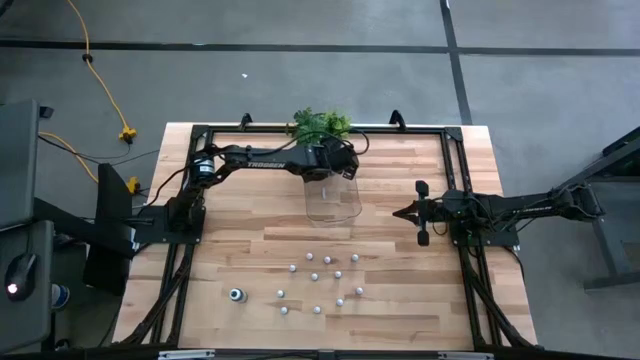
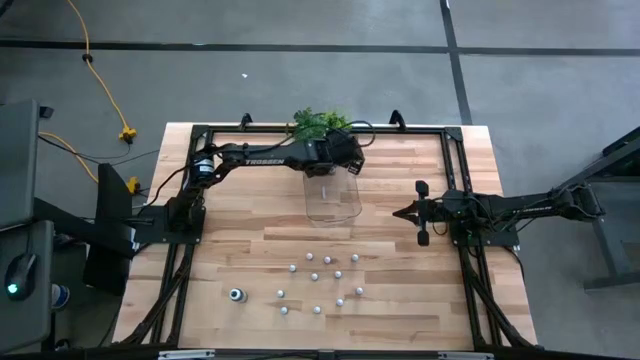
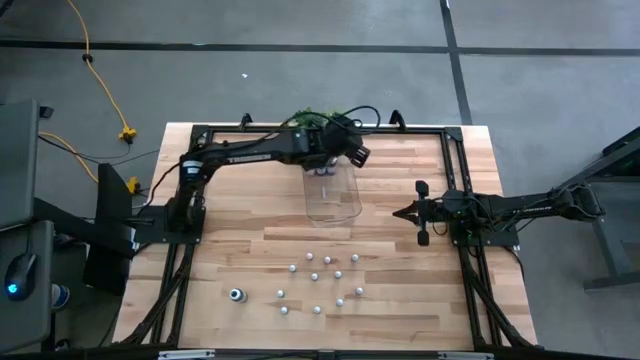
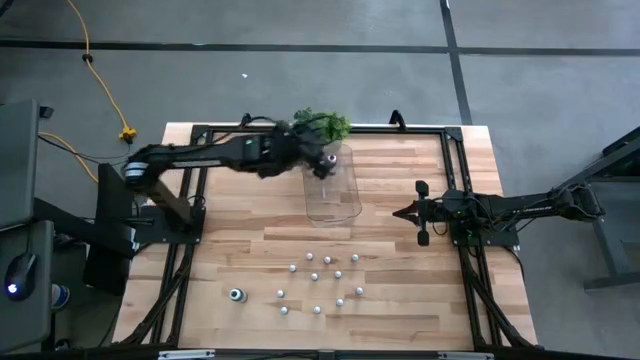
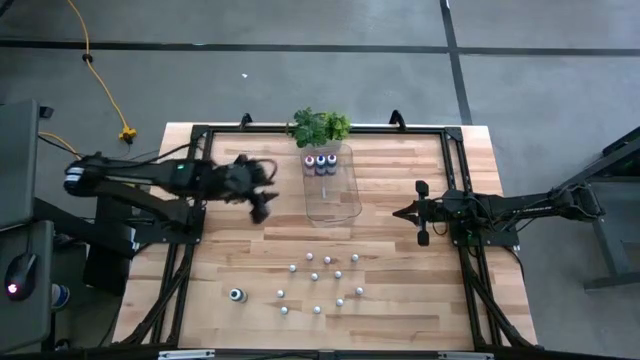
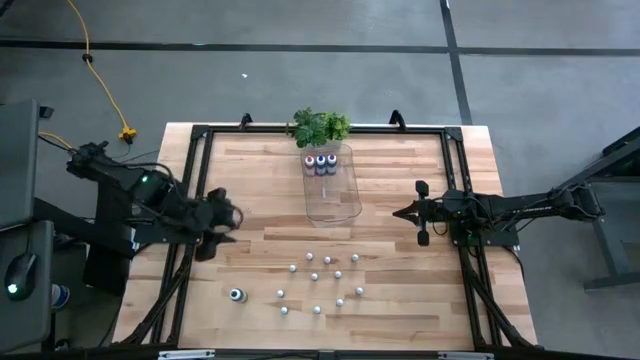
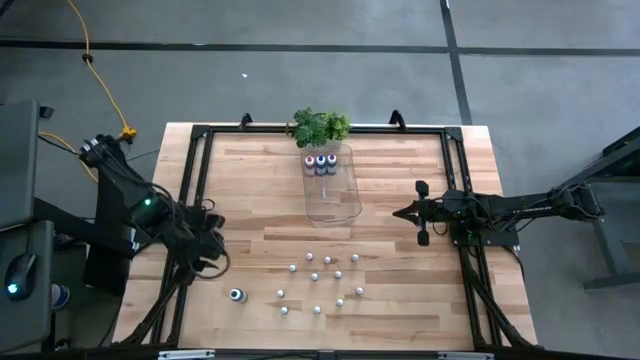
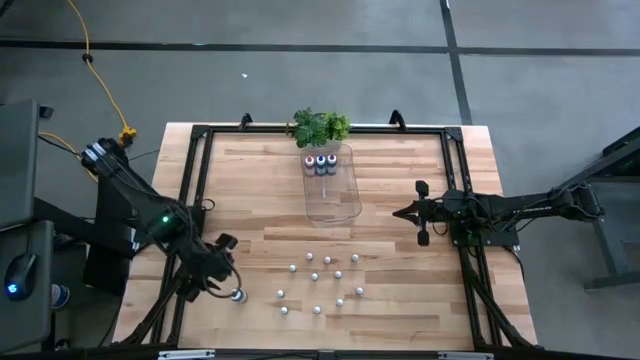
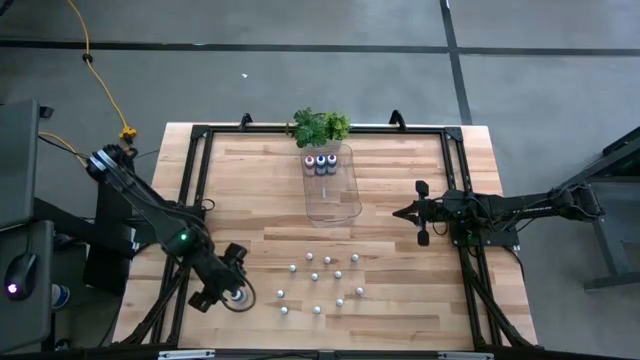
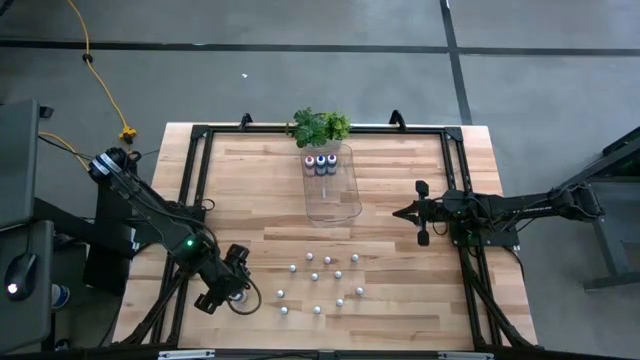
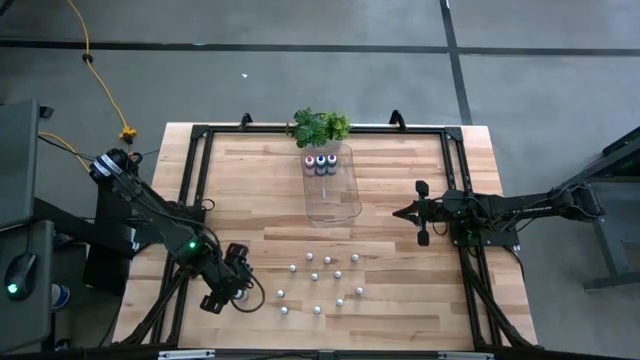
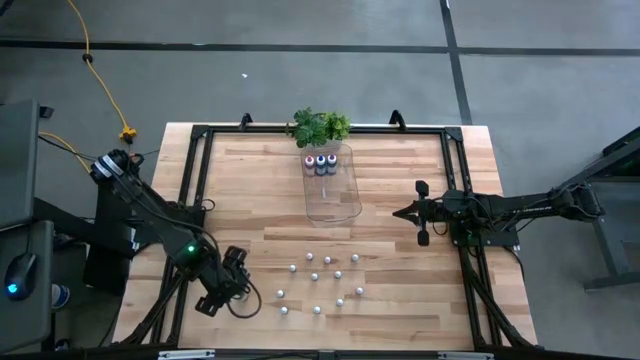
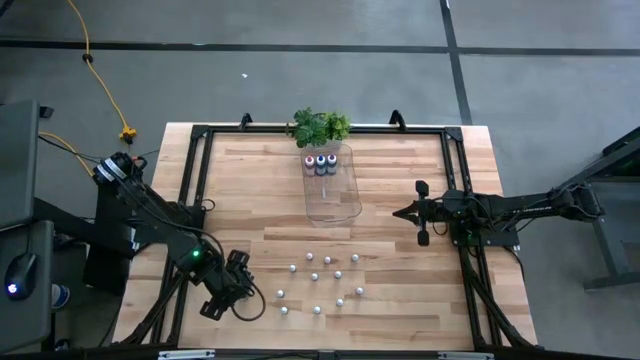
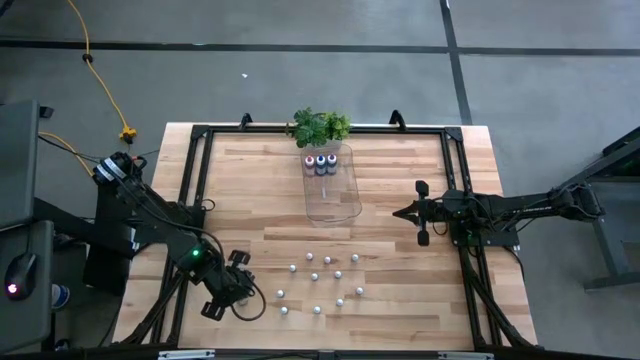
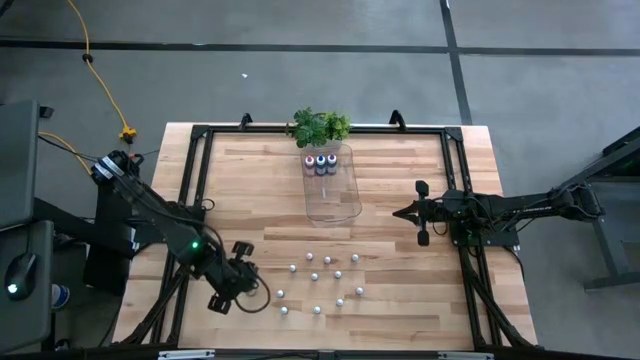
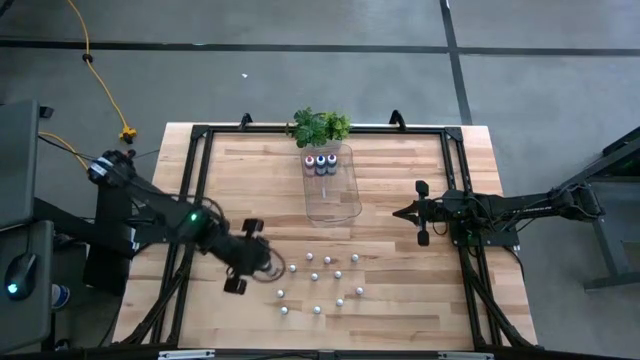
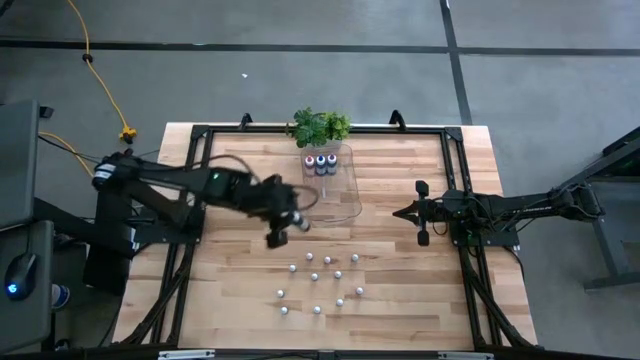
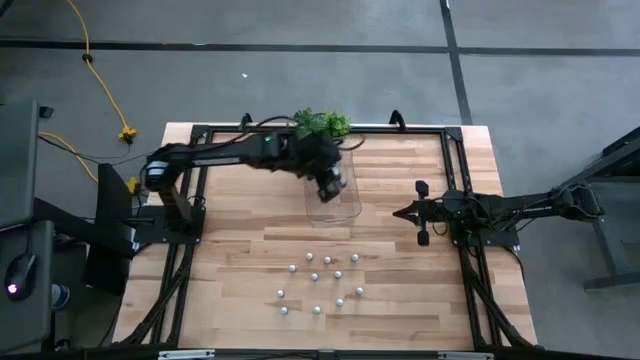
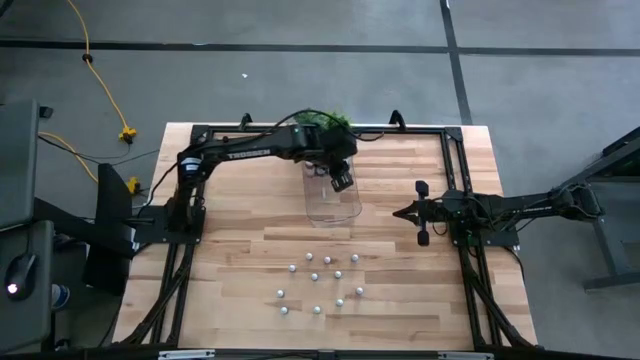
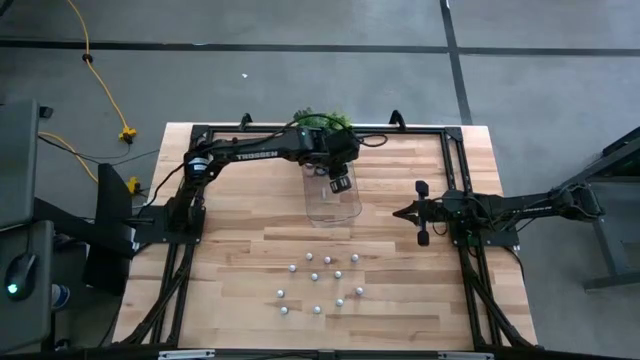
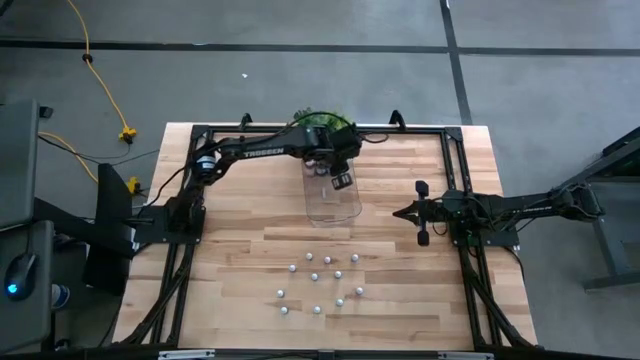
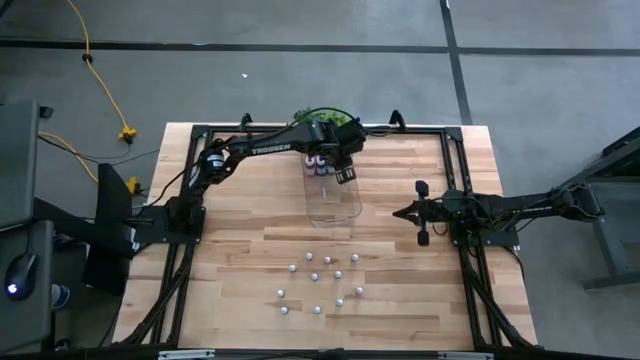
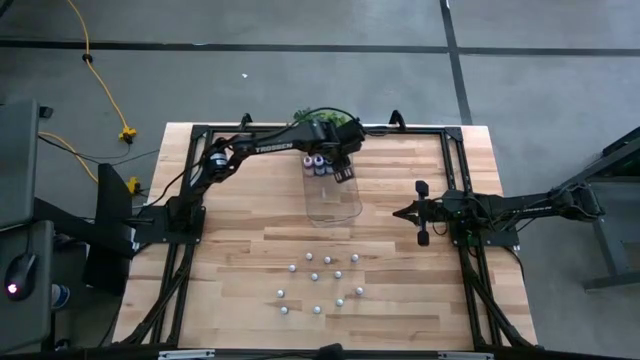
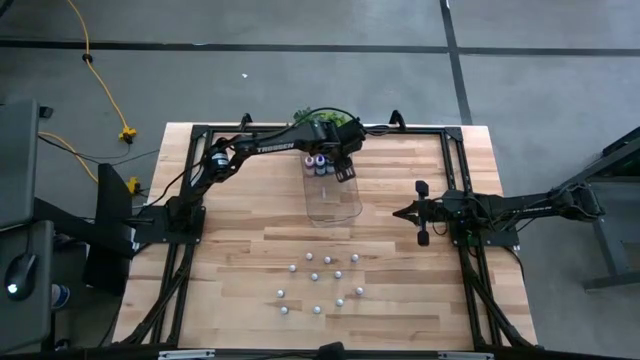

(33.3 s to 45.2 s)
Task: Pick & Place food coloring
Put the large black food coloring bottle into the transparent bin

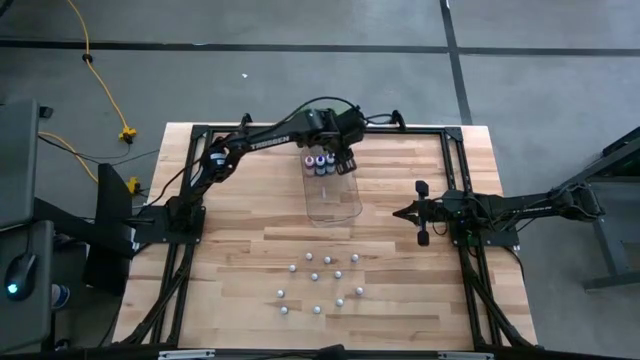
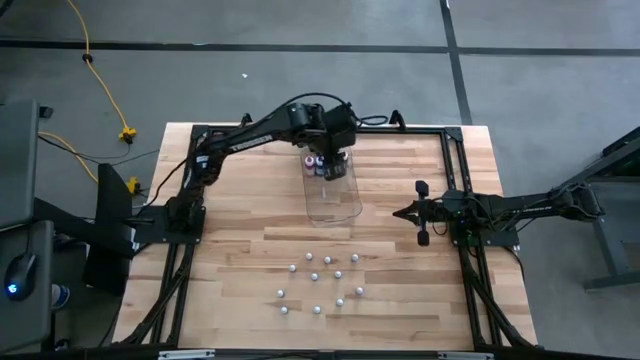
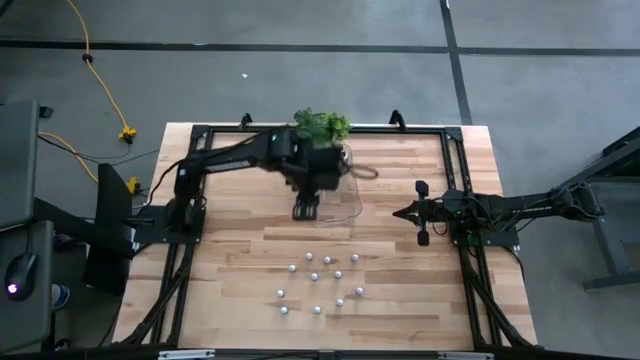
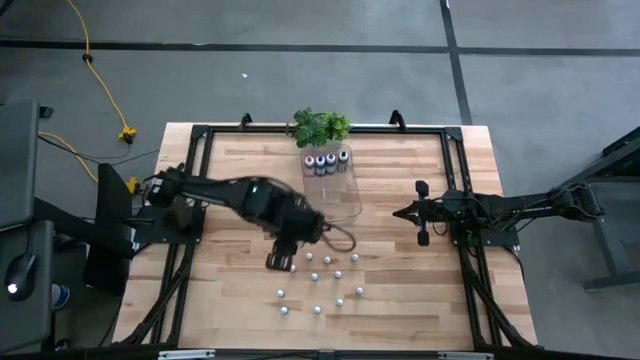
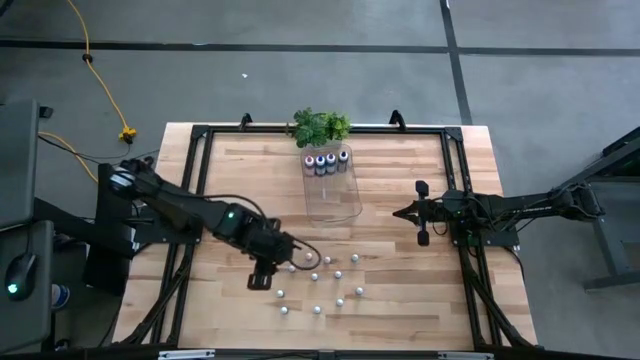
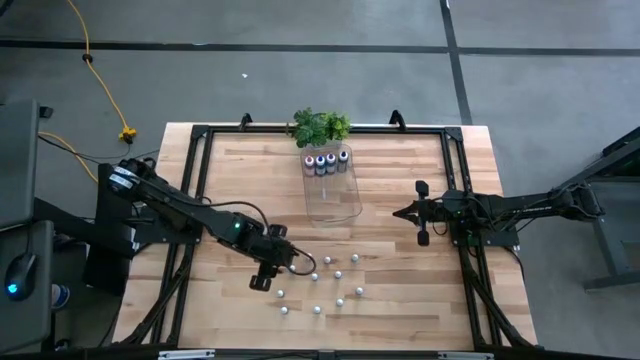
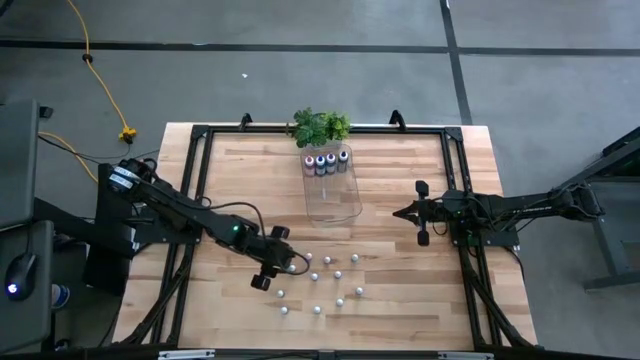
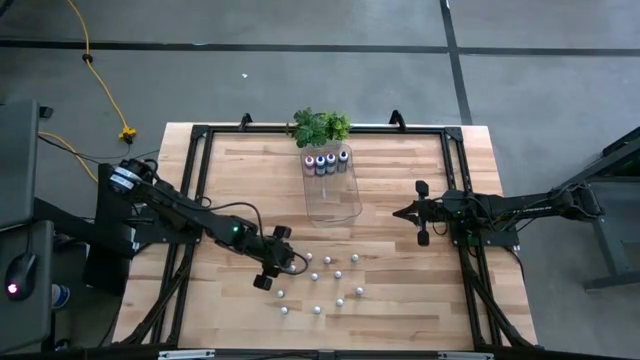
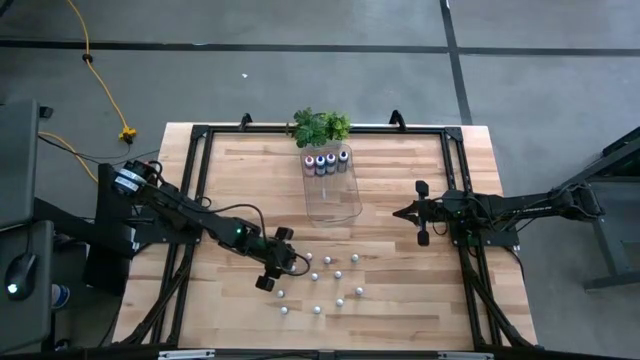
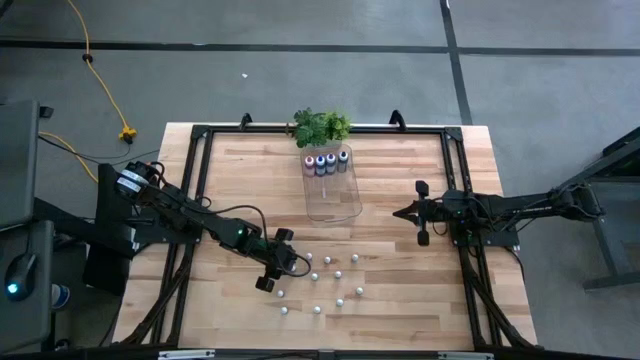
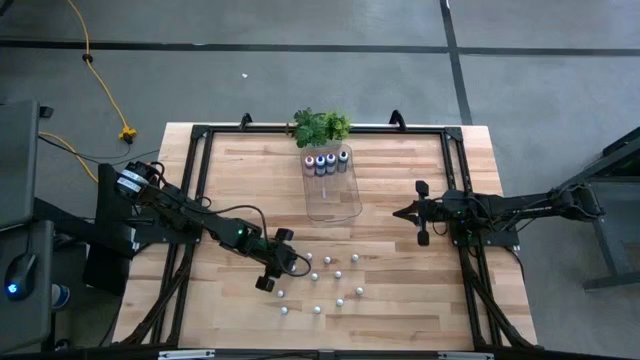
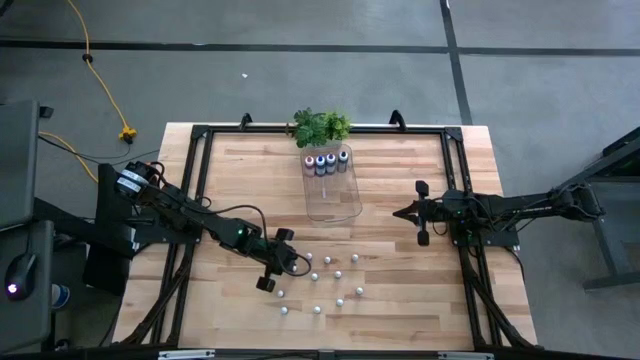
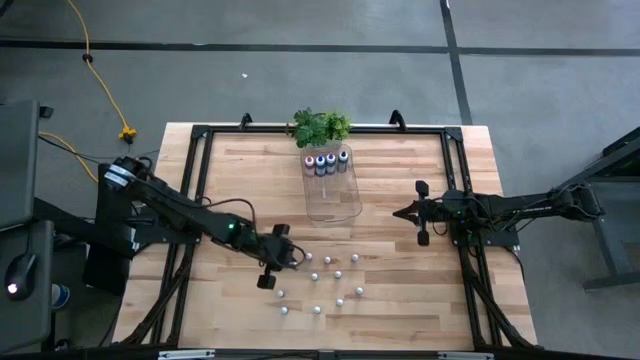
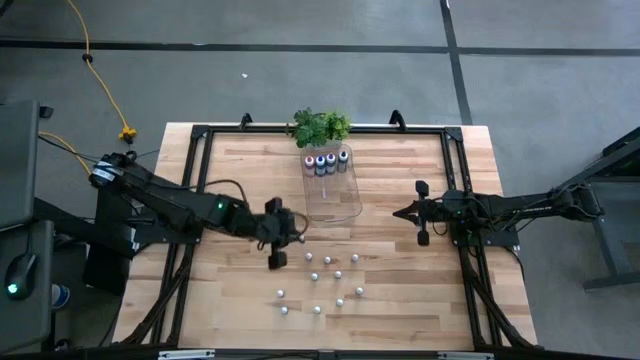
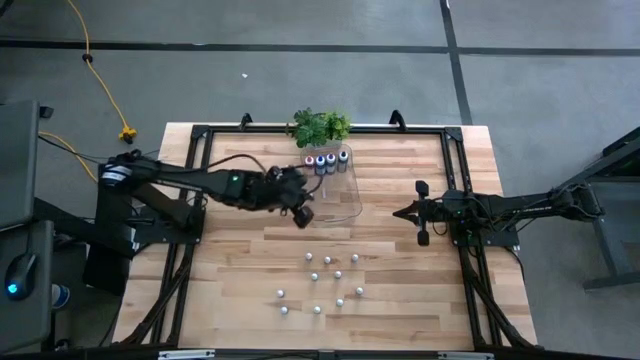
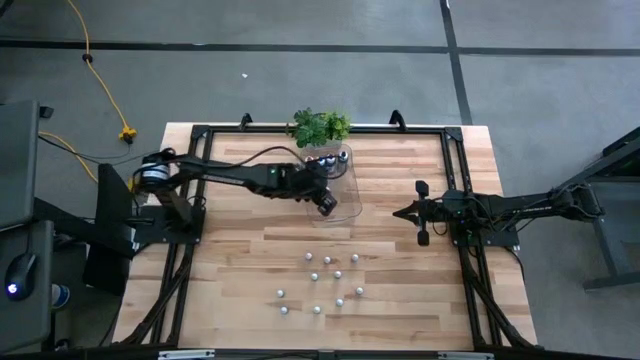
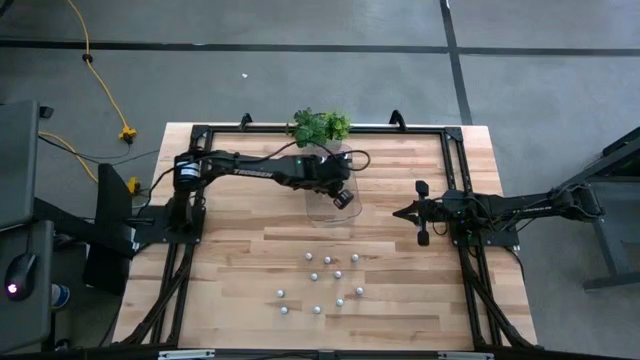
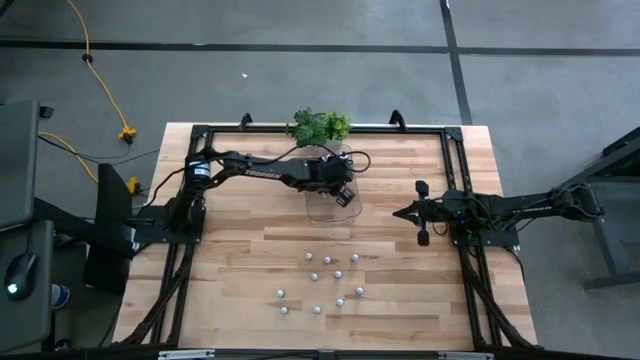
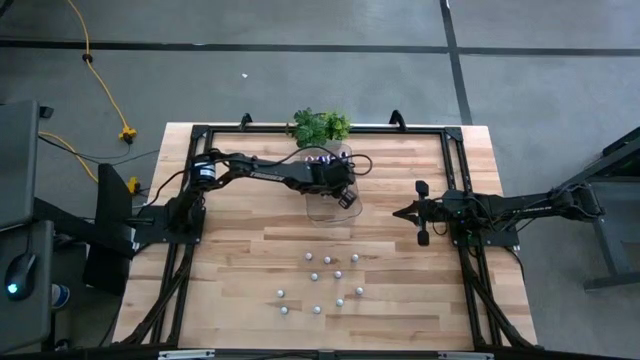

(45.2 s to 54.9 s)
Put the small brown food coloring bottle into the transparent bin
